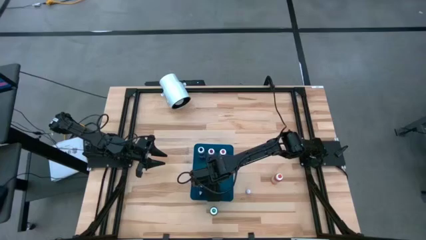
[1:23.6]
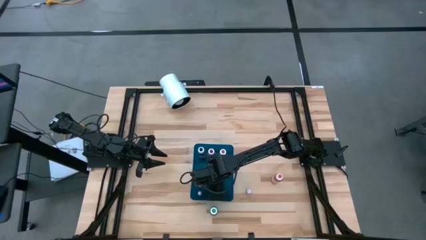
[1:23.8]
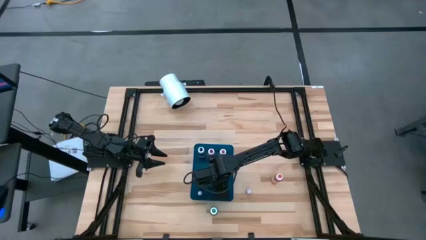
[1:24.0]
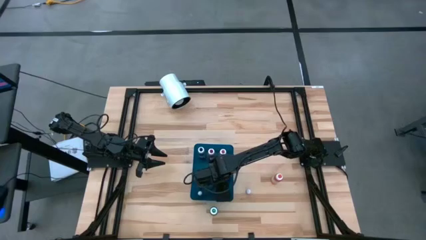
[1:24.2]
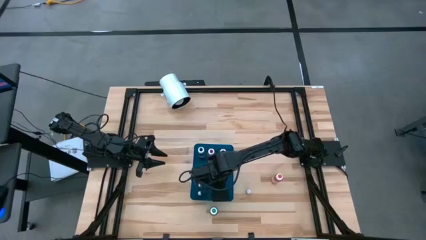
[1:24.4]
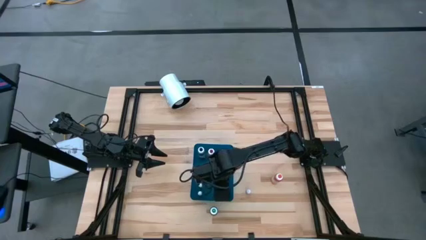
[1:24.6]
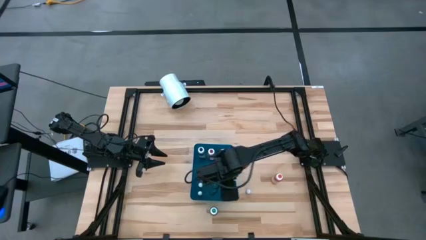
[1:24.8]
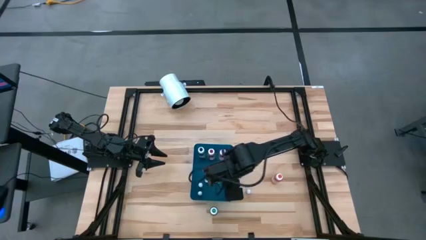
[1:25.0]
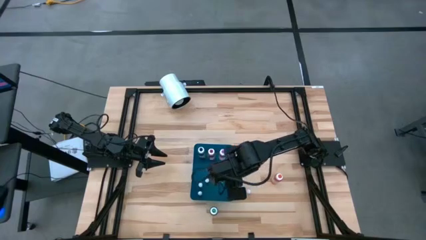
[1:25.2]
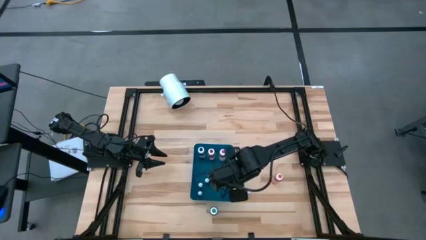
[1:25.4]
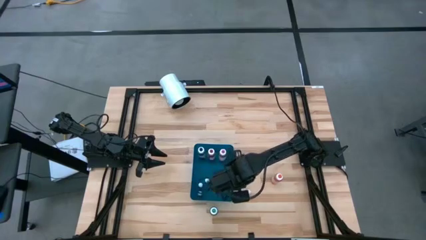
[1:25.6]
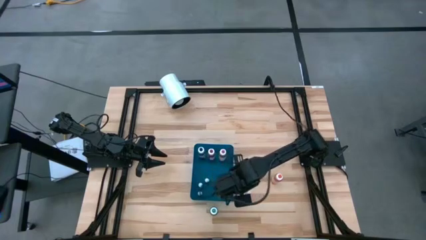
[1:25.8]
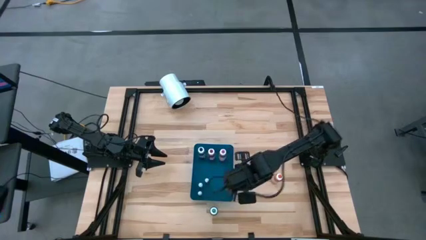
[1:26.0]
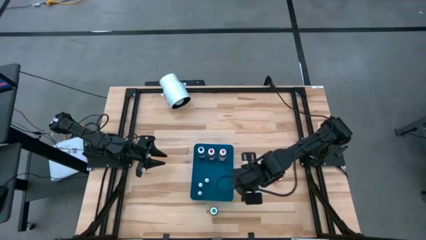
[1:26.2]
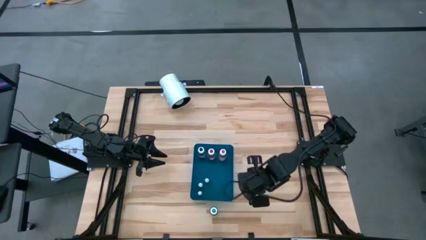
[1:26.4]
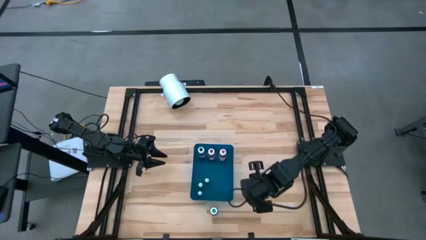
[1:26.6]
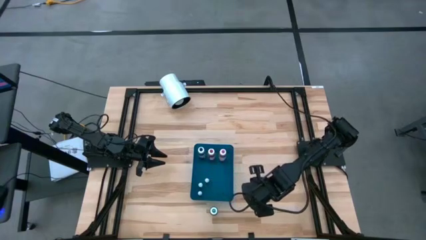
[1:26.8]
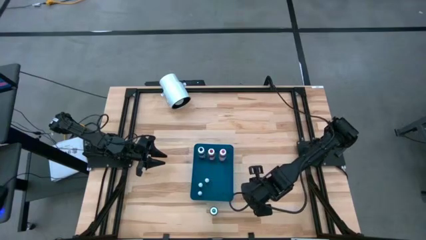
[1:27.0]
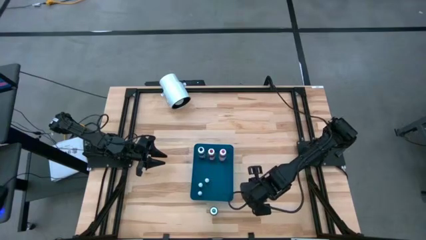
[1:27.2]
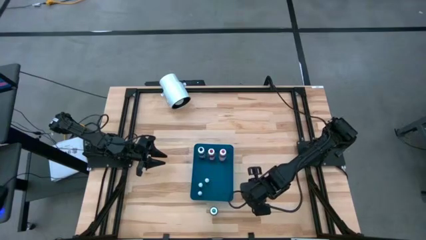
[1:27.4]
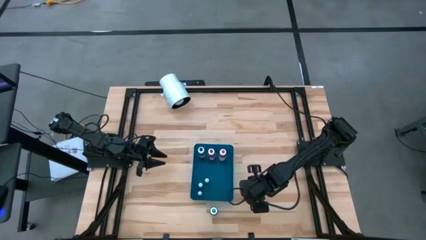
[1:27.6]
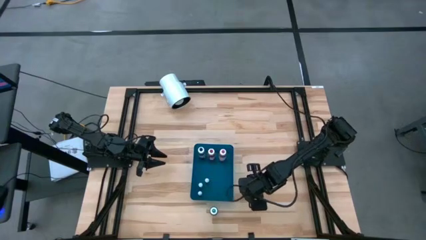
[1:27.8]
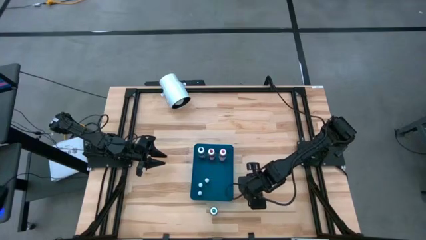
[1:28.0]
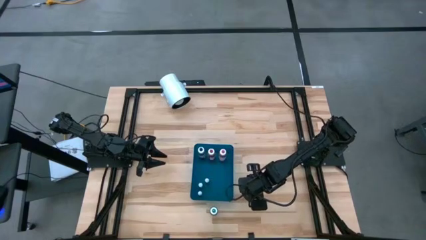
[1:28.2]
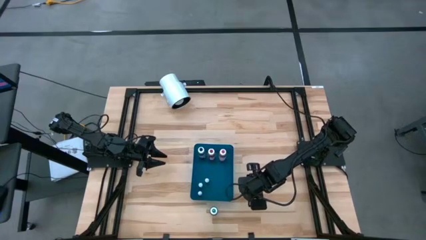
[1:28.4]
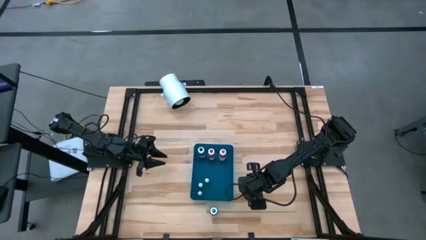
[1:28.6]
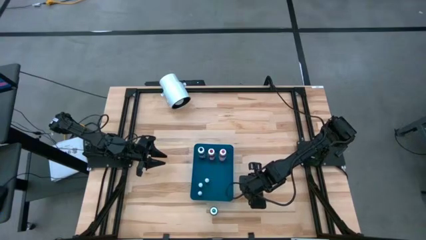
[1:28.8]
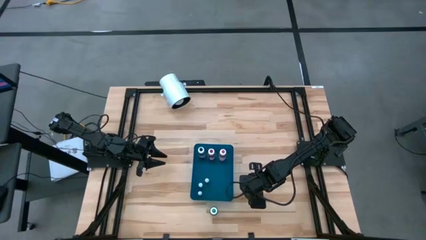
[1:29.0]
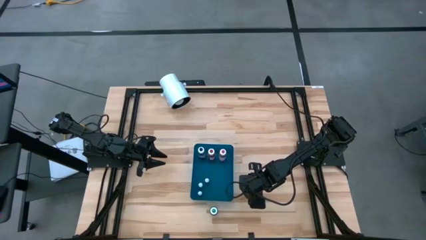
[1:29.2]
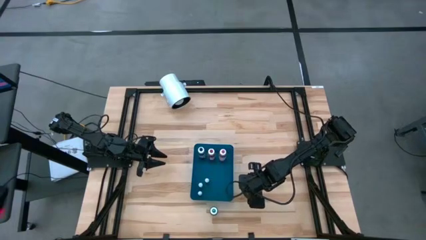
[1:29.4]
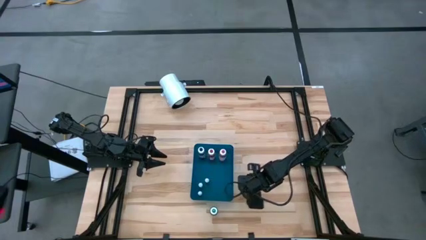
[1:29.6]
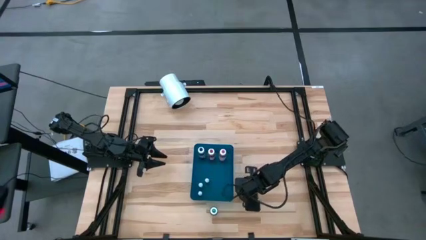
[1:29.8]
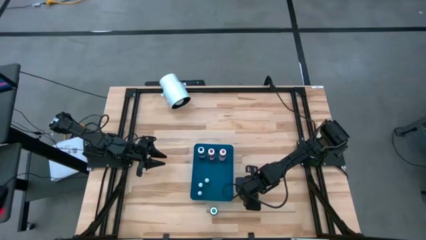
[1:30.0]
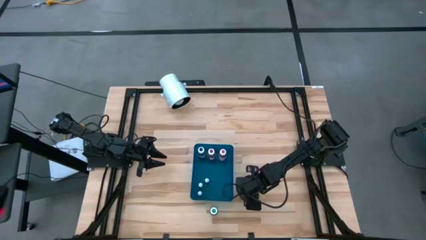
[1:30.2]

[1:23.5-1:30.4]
Task: Pick & Place food coloring
Put the small brown food coloring bottle into the blue bin

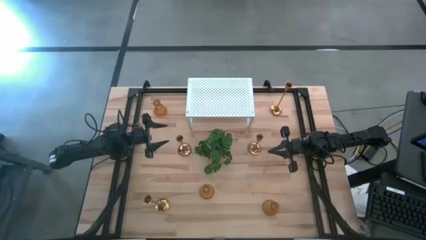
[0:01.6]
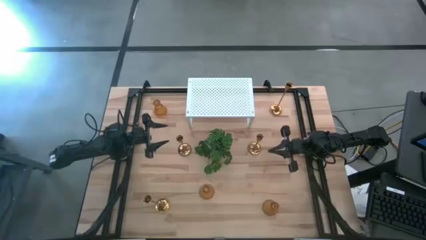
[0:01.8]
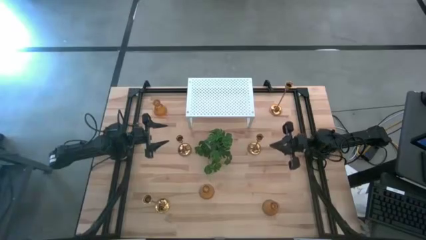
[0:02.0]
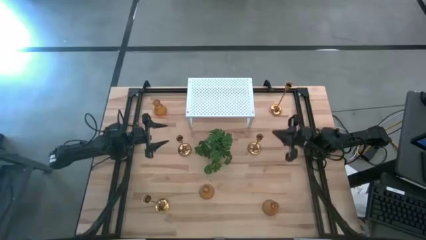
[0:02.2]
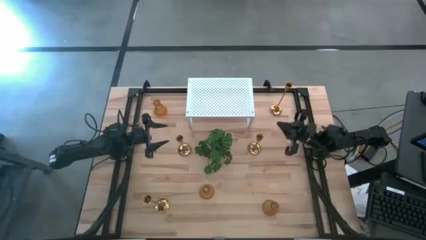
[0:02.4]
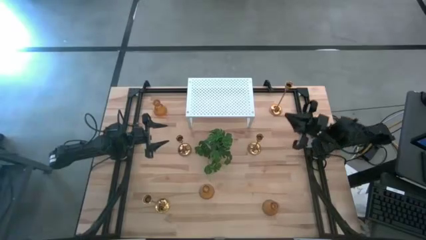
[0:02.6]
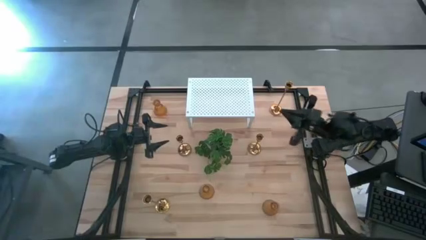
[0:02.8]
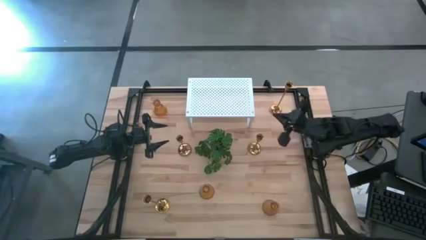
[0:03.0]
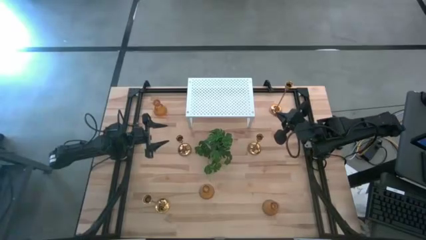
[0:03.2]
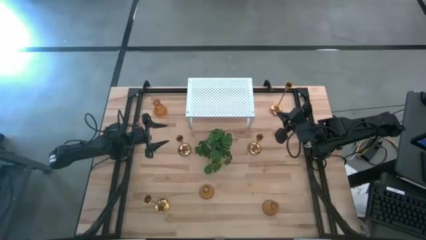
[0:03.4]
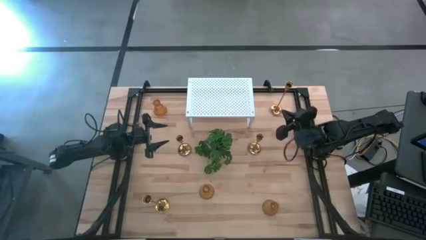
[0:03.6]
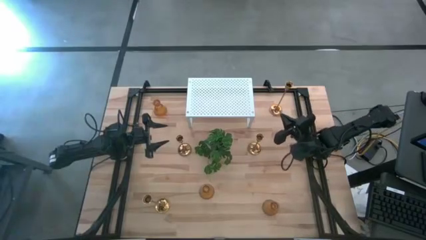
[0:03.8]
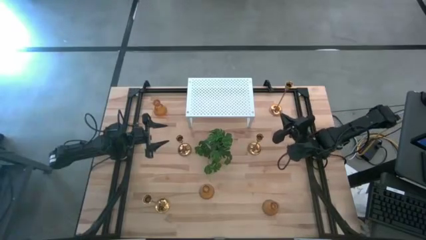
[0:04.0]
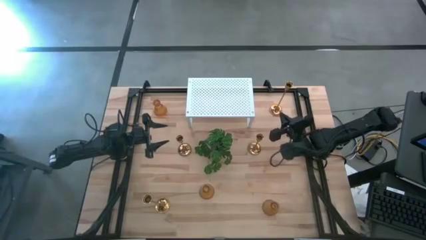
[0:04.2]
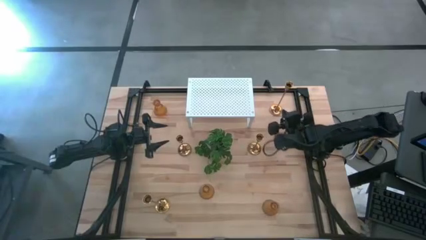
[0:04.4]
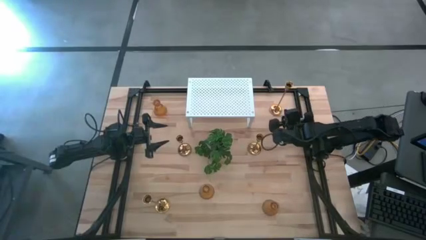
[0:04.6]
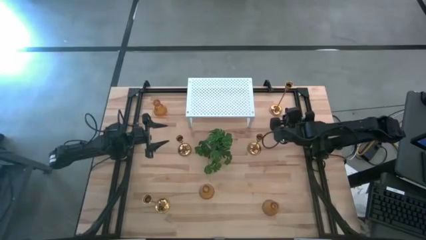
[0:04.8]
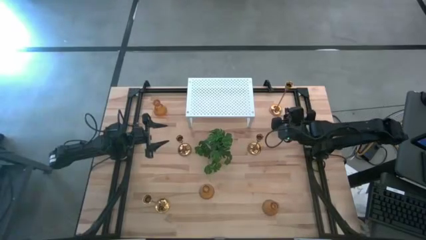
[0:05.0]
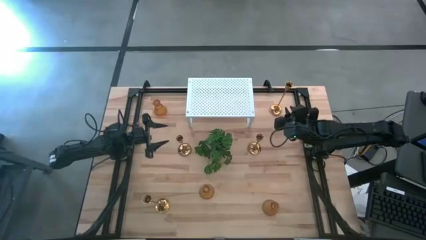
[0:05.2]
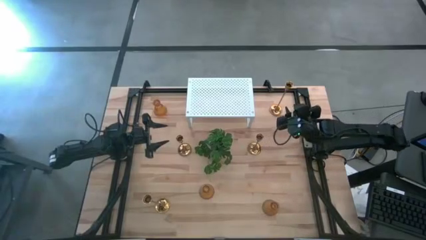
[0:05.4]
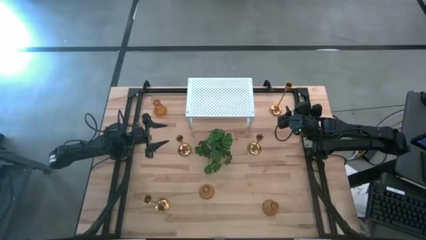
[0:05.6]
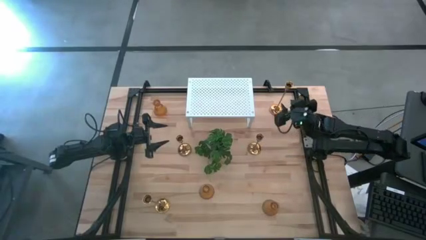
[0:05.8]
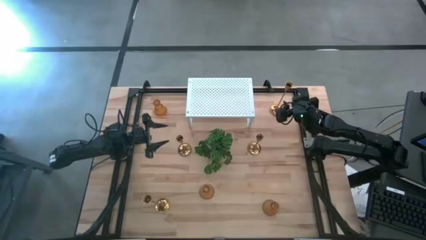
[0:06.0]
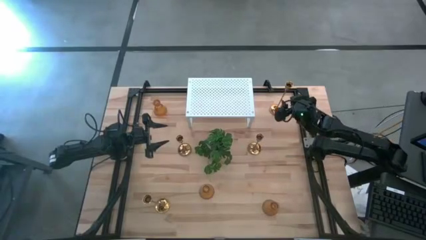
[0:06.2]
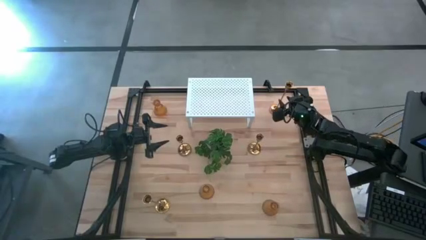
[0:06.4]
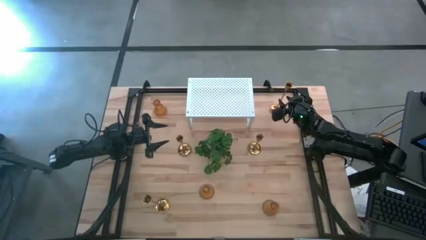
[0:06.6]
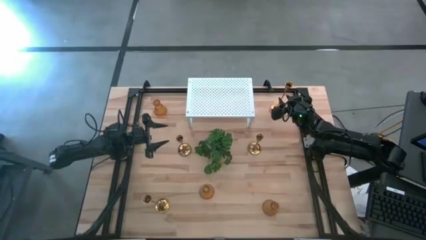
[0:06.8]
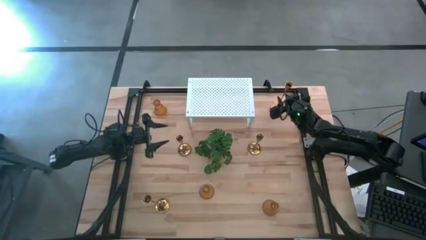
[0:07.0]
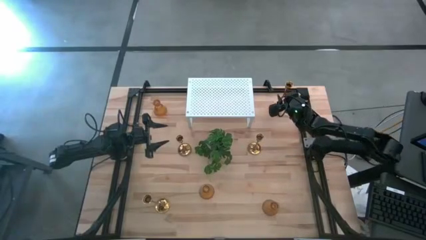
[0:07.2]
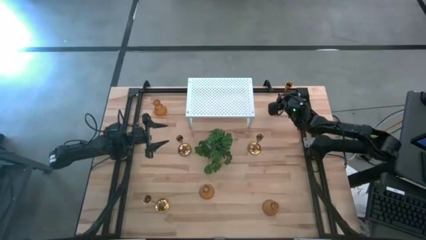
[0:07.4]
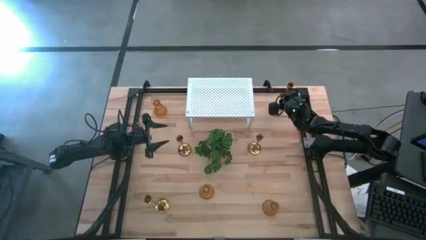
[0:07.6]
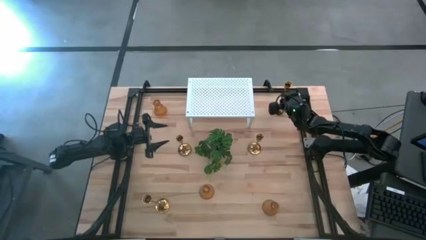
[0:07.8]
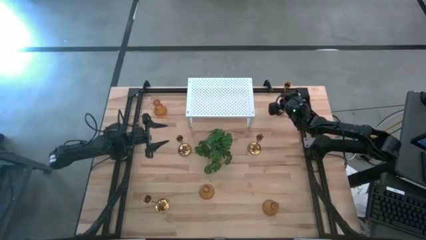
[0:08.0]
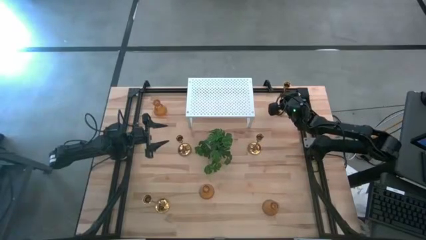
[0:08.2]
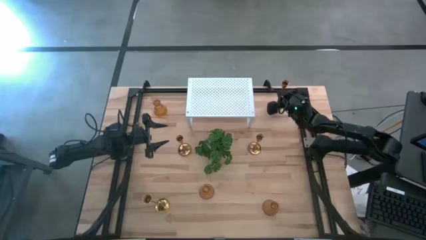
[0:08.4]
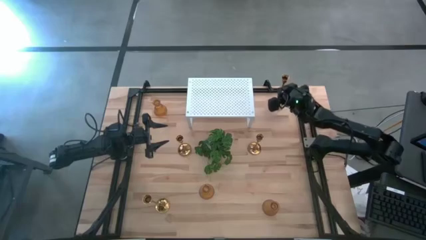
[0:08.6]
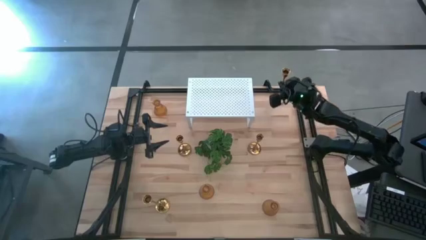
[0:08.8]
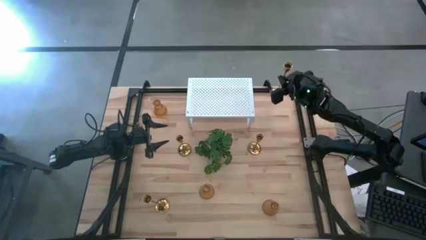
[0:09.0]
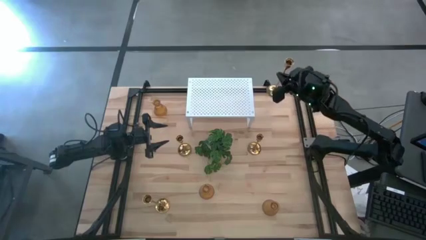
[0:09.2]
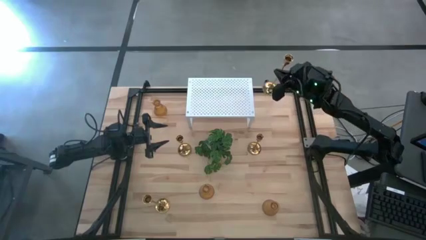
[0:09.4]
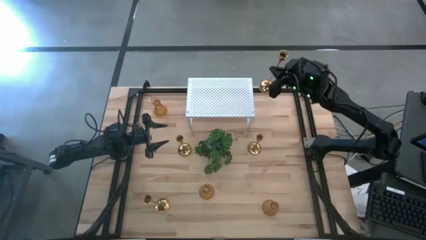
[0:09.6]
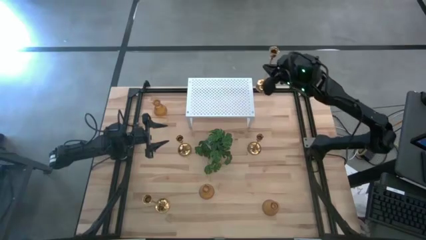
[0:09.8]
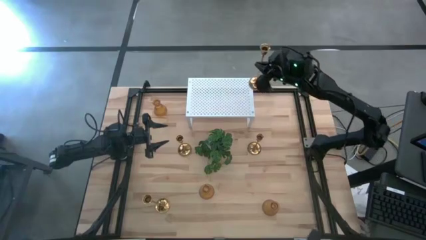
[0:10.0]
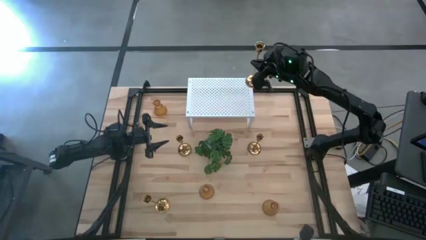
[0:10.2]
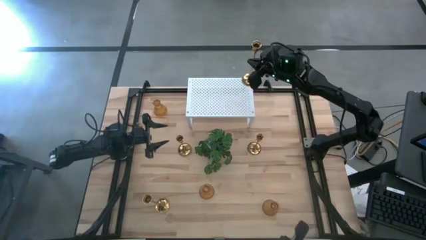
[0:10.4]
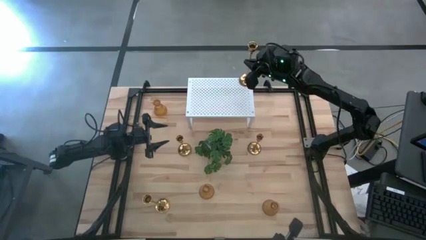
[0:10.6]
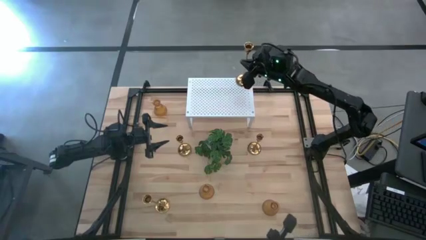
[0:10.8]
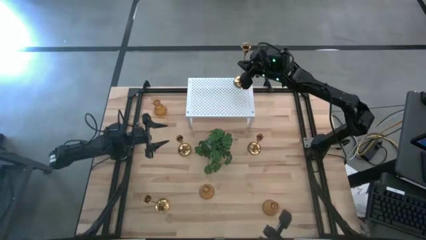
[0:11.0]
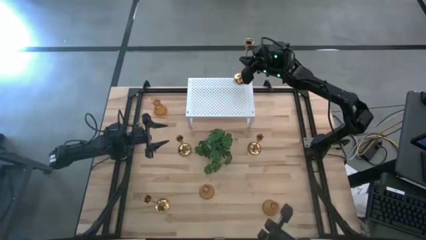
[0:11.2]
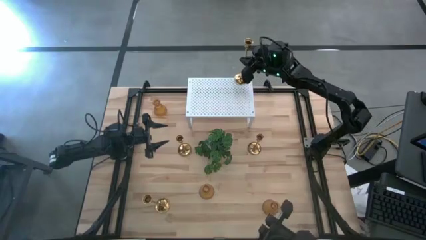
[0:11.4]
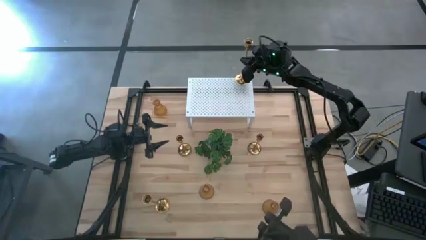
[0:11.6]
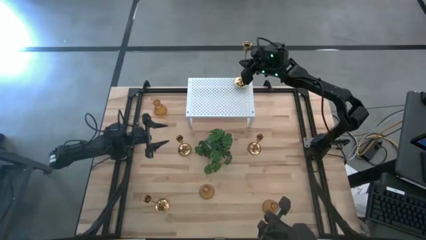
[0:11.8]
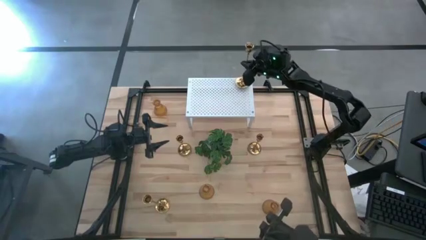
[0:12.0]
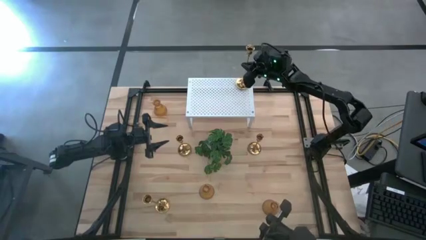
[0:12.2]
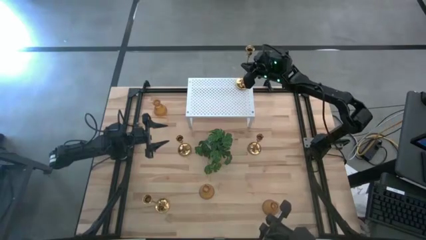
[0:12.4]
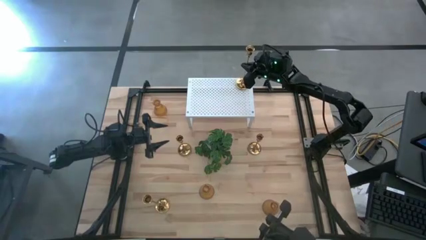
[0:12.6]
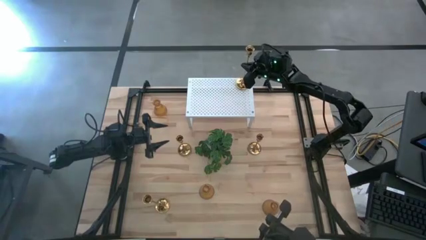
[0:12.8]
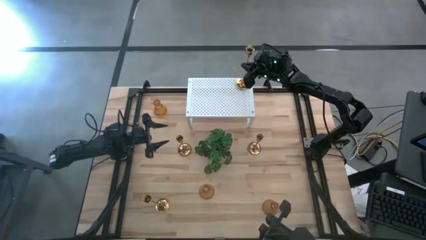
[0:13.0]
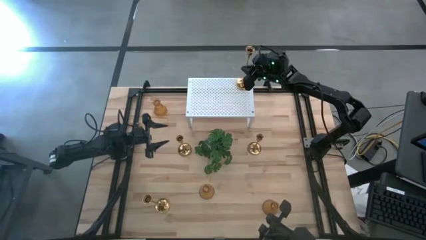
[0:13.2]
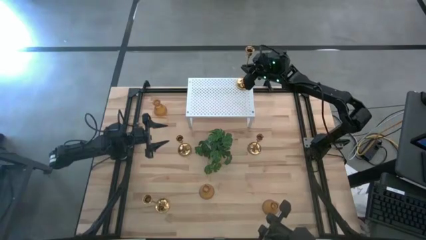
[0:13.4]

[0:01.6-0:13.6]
Task: Pick & Place candle stick holders
Put the big gold candle holder on the shelf
